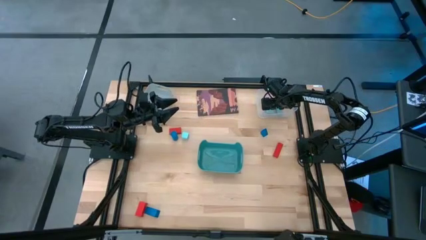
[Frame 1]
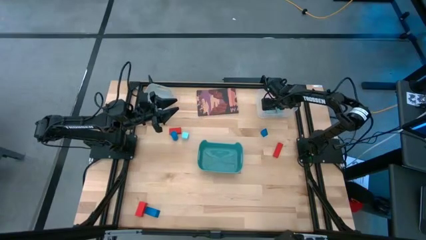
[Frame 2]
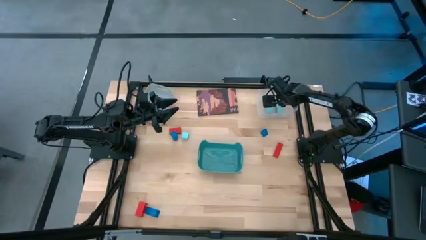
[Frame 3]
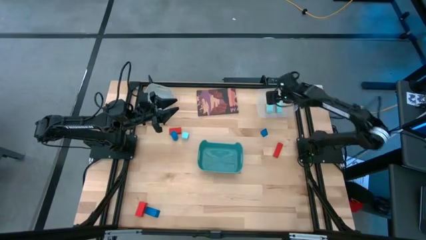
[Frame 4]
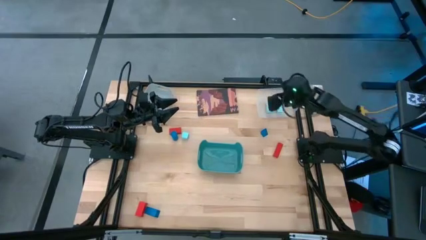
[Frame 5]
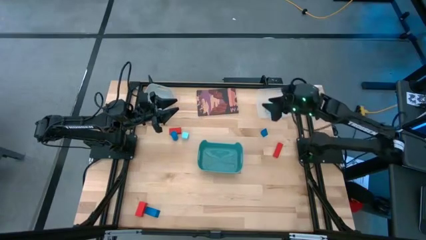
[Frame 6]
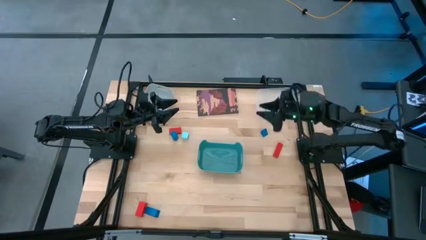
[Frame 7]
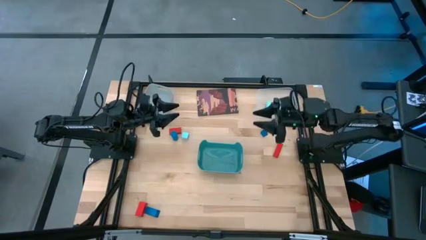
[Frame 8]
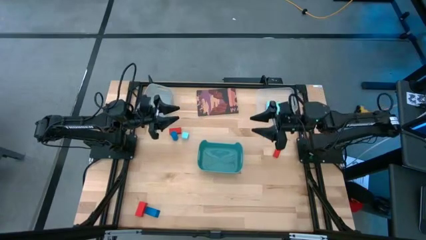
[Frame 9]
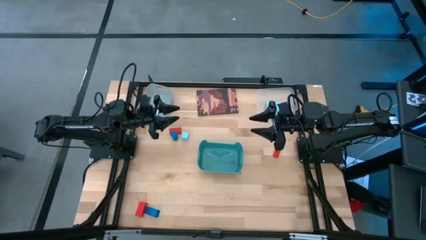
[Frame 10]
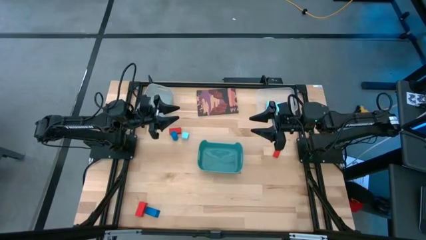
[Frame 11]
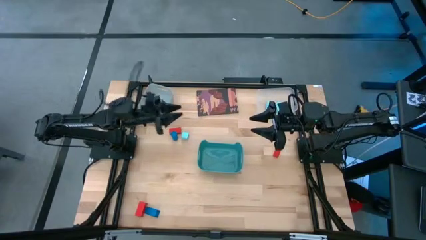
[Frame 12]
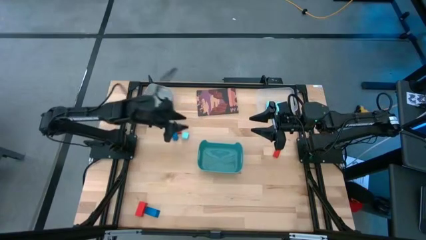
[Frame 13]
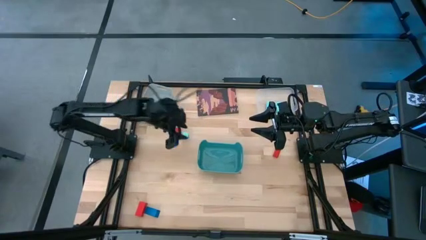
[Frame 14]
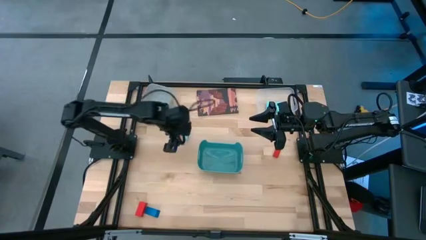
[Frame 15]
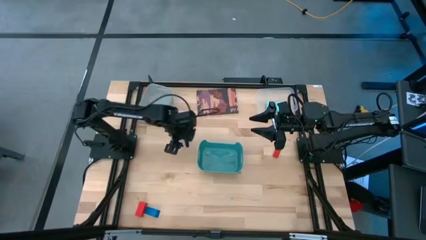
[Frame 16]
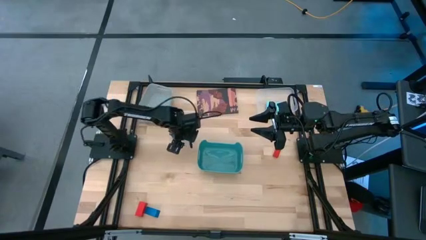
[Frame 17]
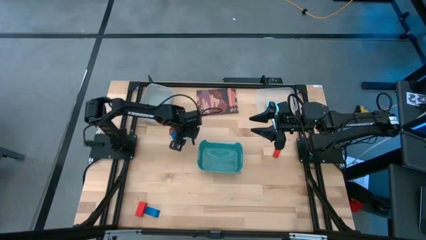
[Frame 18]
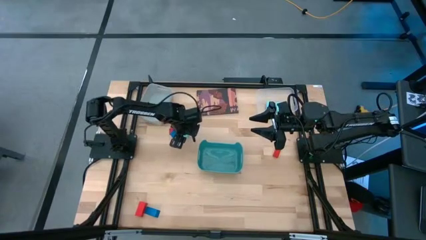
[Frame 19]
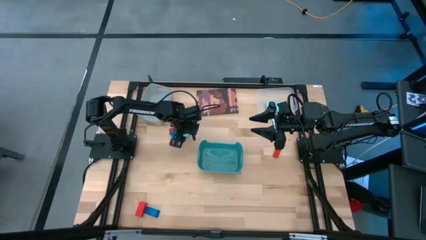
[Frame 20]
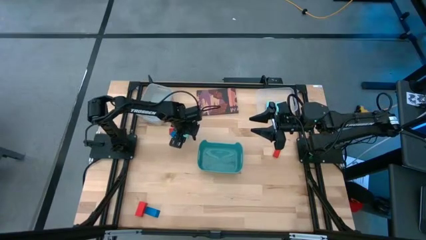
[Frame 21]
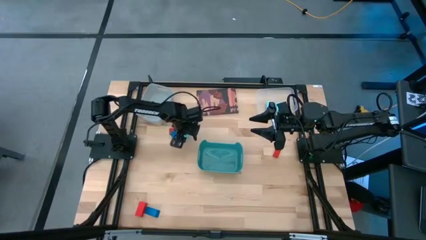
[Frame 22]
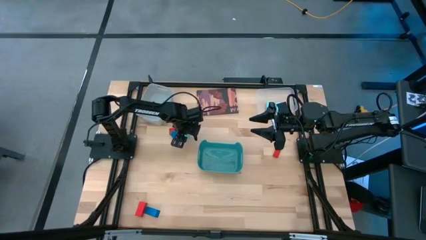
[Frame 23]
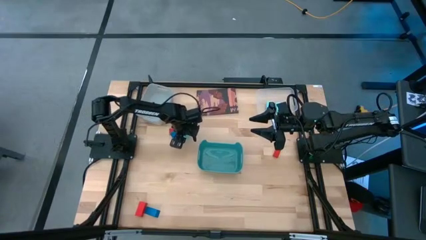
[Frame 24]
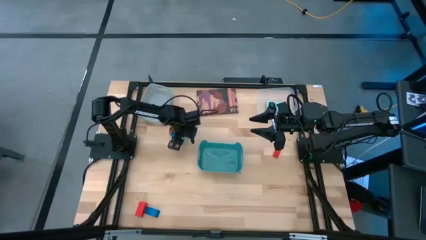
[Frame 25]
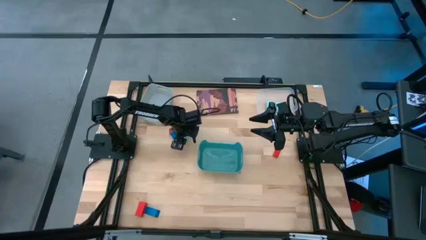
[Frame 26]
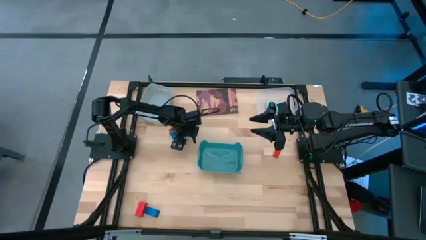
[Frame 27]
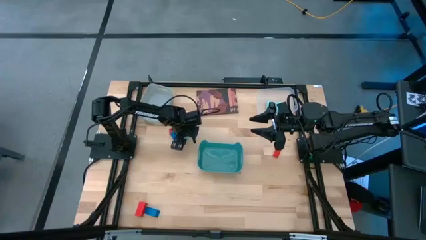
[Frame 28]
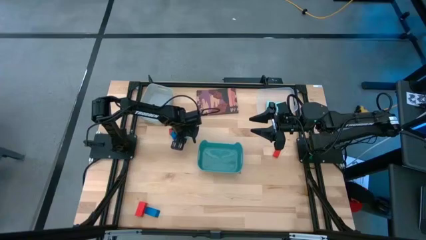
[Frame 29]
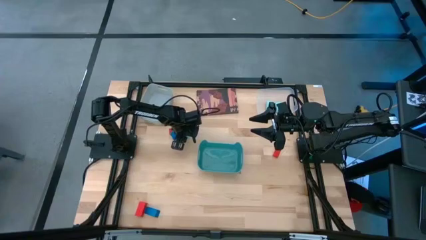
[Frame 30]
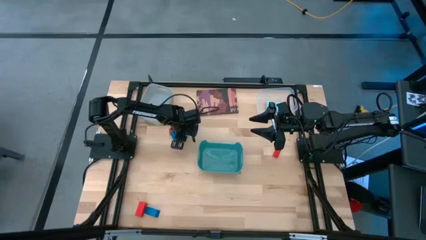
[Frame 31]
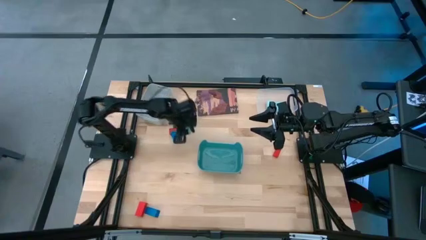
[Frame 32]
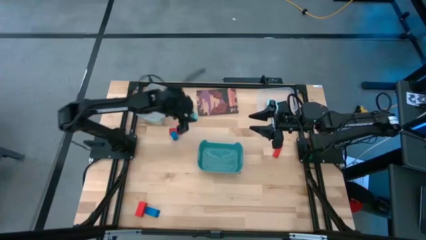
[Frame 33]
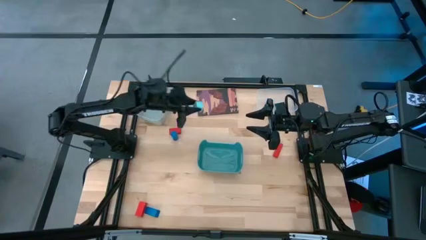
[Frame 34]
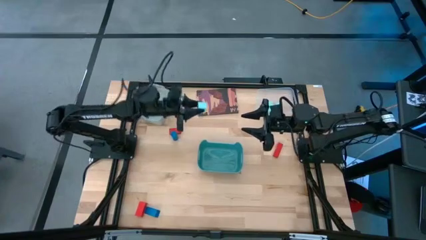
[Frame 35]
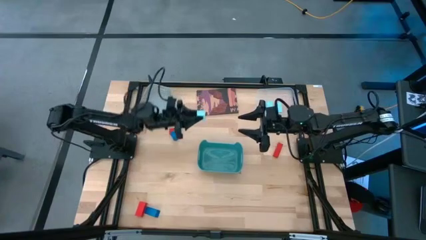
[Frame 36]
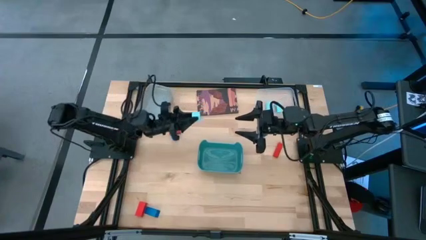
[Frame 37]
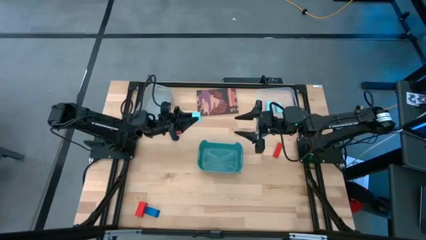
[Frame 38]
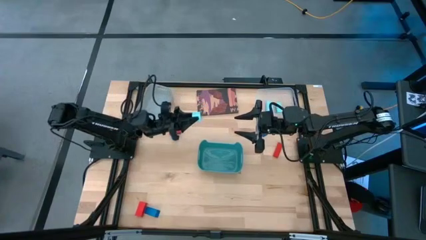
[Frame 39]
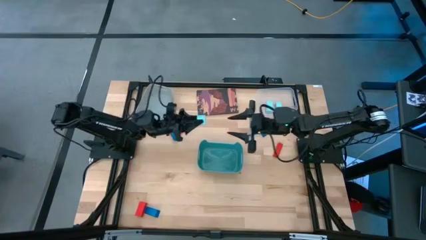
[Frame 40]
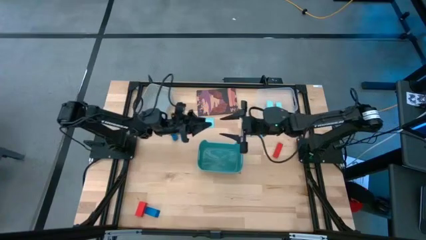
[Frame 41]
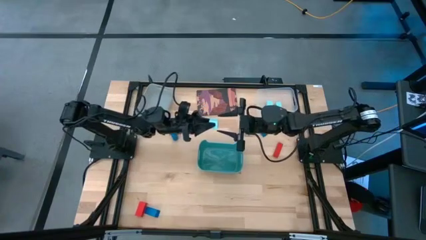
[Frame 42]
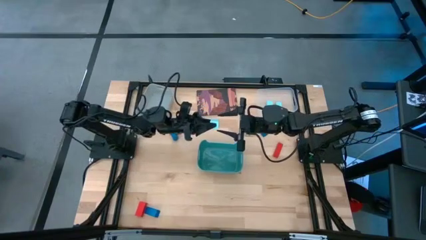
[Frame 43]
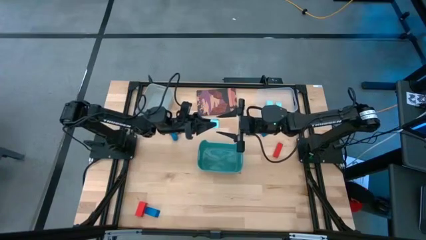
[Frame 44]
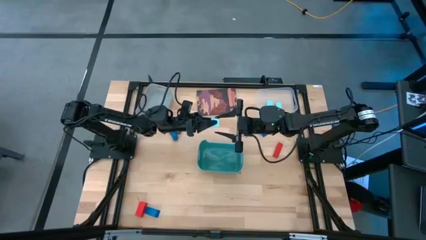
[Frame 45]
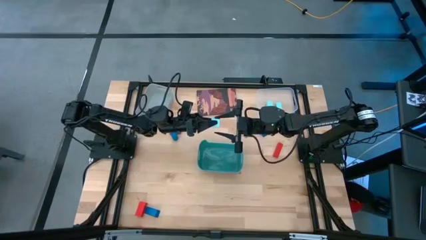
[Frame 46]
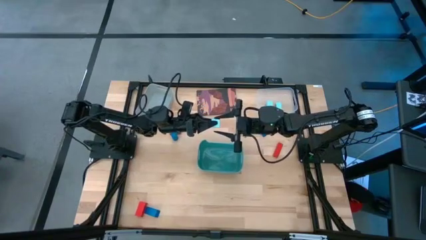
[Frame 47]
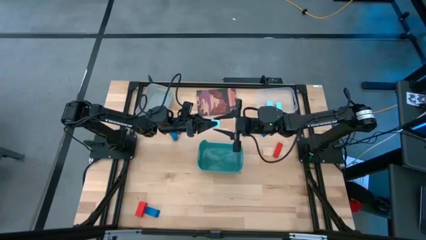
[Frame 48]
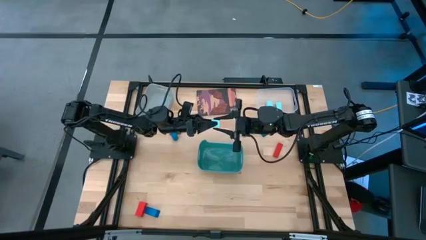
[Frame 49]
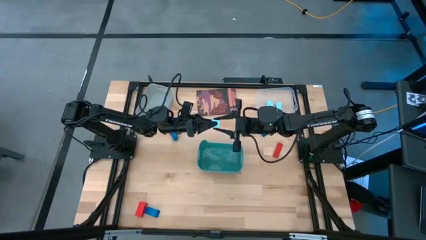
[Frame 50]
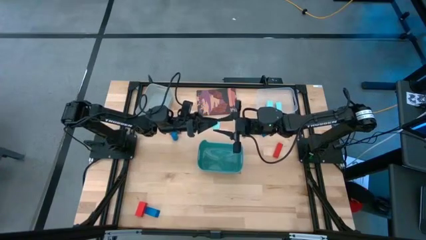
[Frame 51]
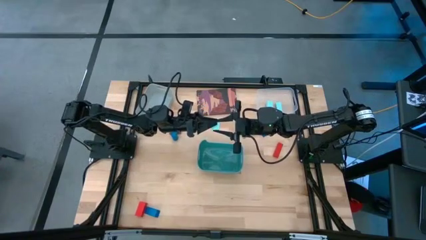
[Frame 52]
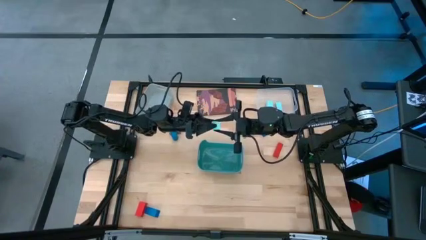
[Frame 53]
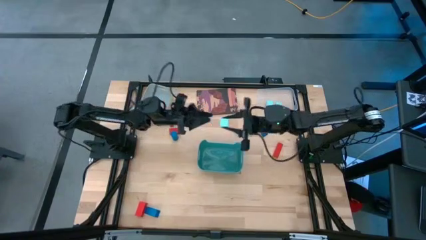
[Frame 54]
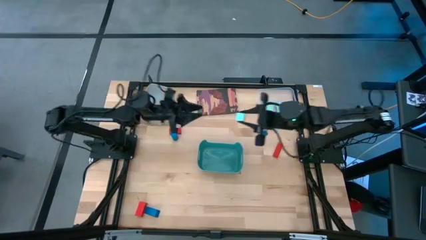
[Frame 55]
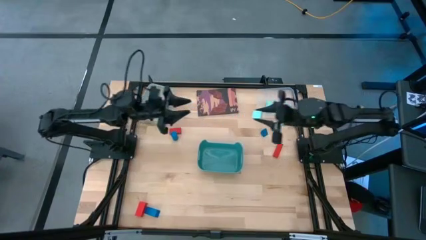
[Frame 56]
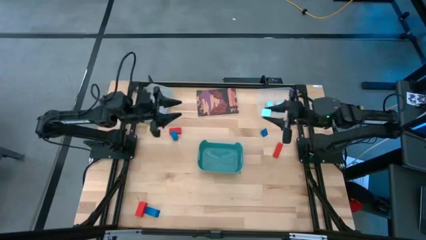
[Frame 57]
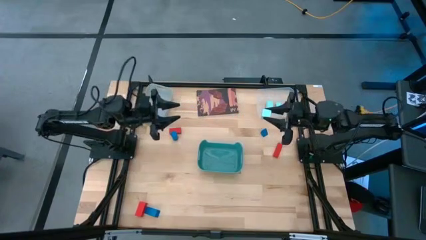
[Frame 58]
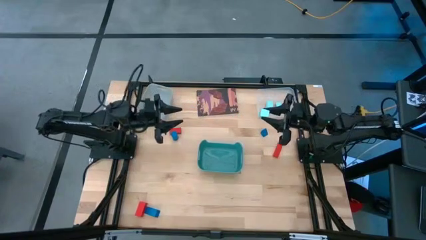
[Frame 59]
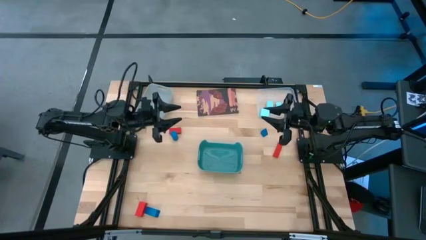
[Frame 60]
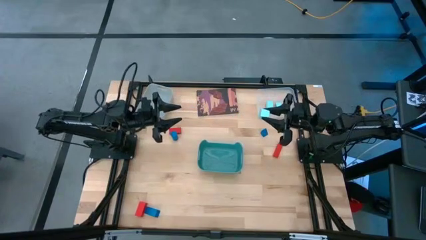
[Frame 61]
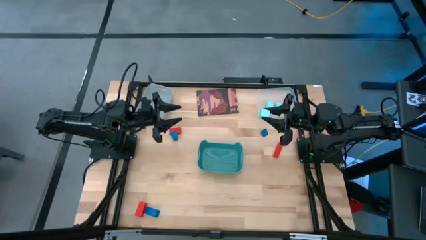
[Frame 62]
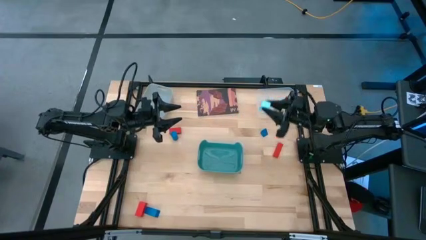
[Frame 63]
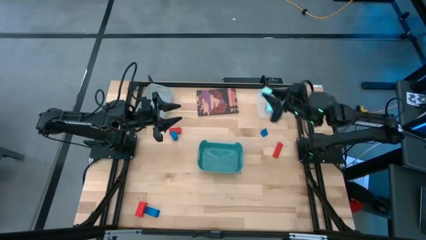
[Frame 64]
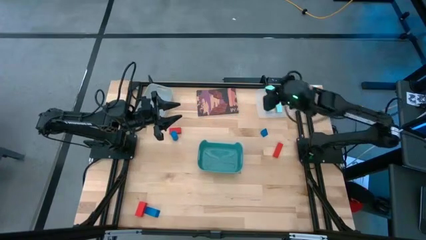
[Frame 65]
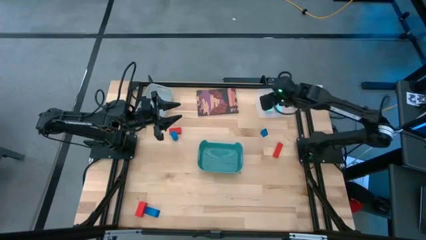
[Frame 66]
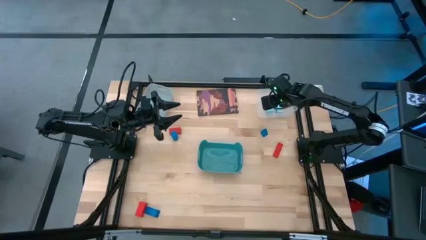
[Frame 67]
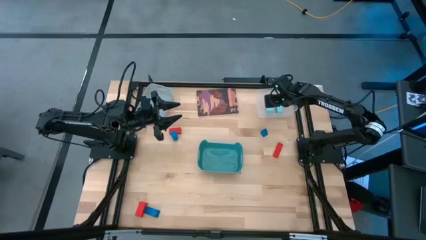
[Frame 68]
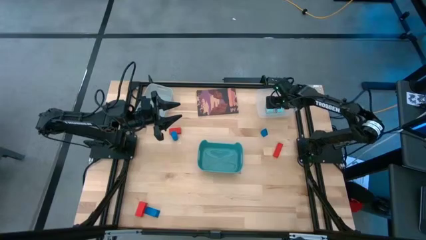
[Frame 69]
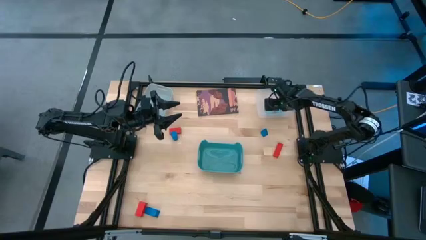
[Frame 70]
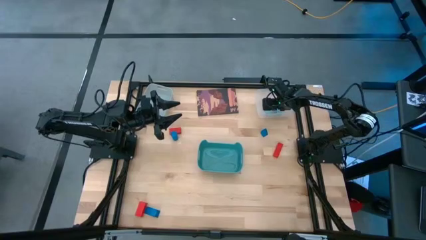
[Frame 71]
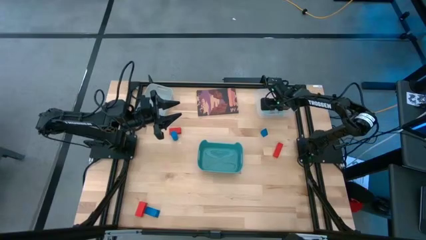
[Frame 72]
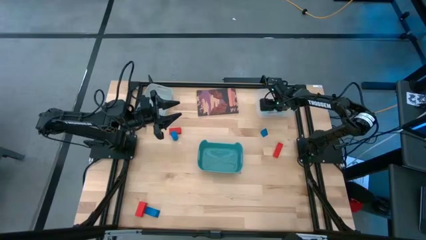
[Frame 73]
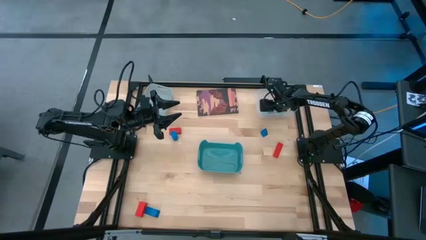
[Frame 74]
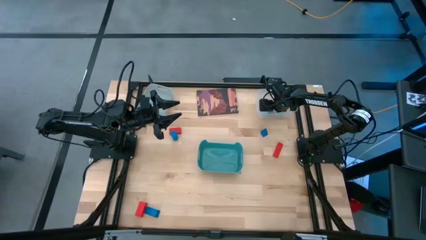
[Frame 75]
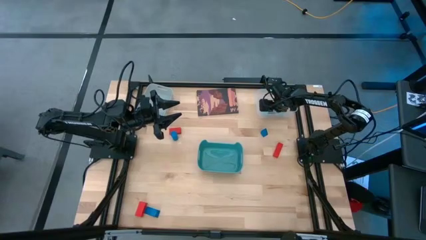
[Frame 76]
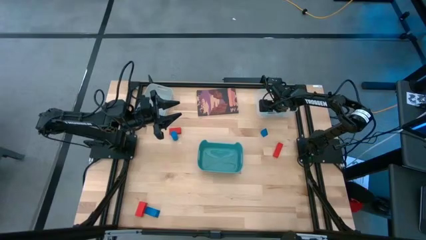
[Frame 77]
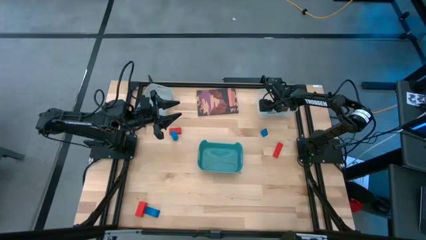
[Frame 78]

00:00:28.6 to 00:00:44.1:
Task: Sort & place blocks by color
Put the square blue green block into the transparent bin
